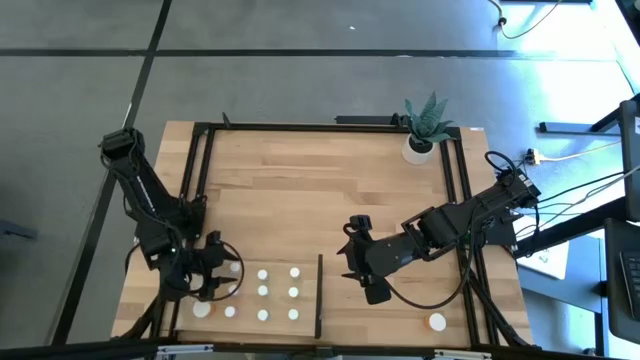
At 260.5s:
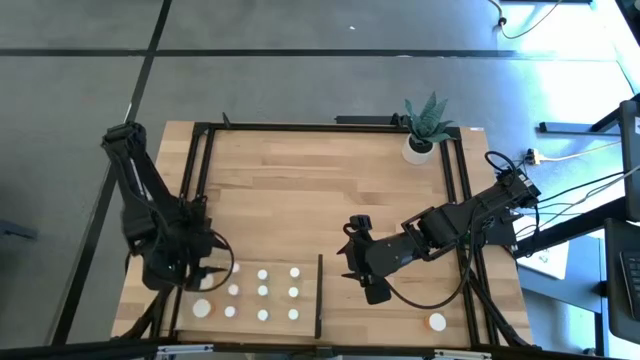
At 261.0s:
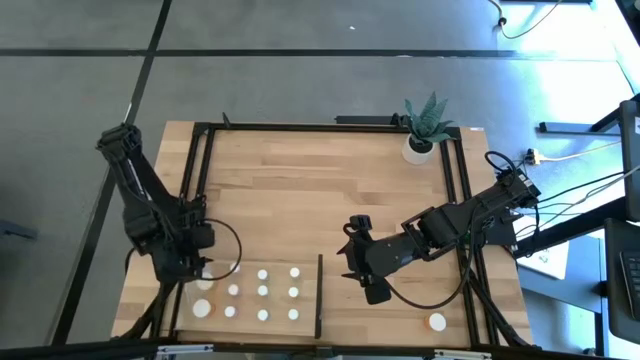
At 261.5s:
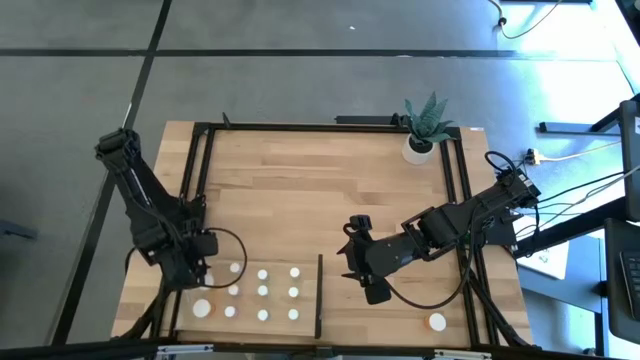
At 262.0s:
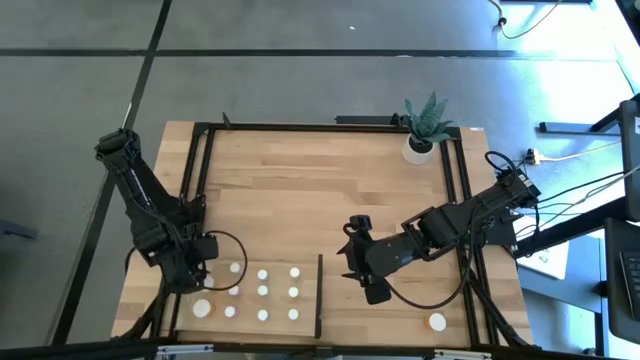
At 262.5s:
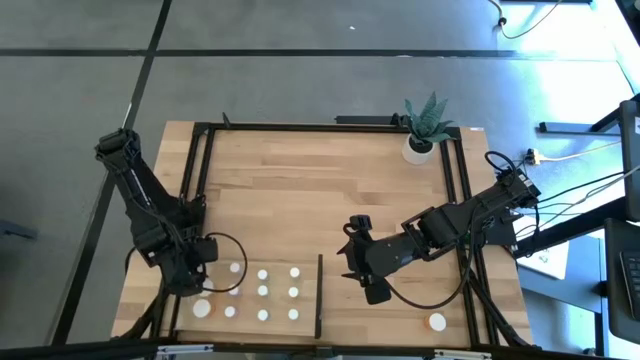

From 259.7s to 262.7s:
Task: Pick and place medicine bottles onto shelf by color
Adjust the orange pill bottle on the shelf

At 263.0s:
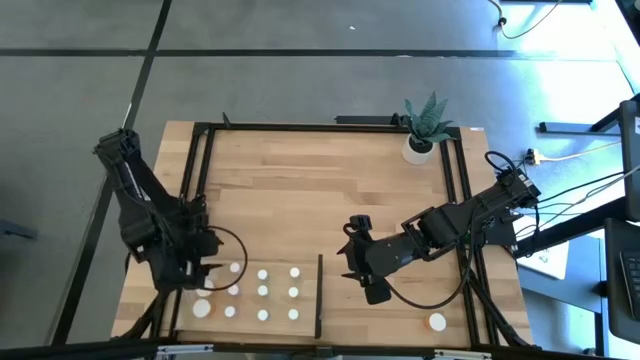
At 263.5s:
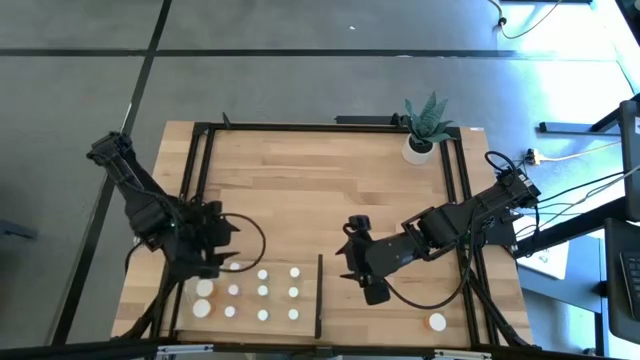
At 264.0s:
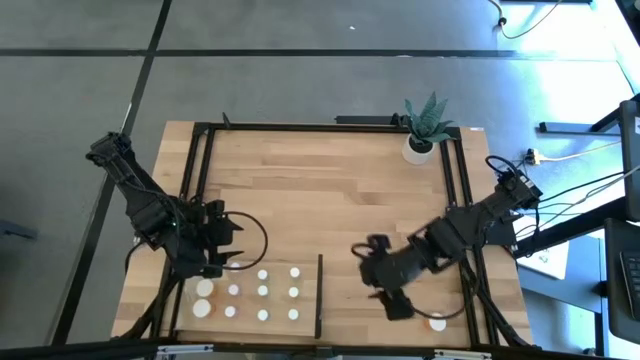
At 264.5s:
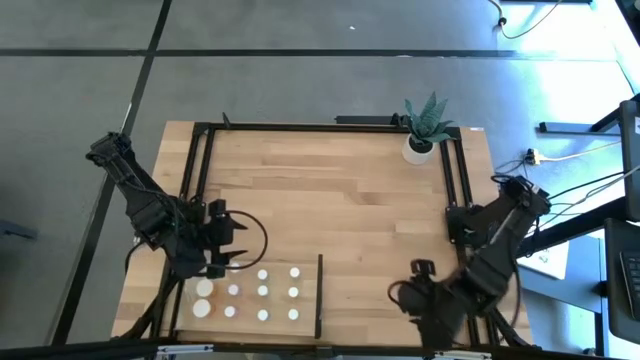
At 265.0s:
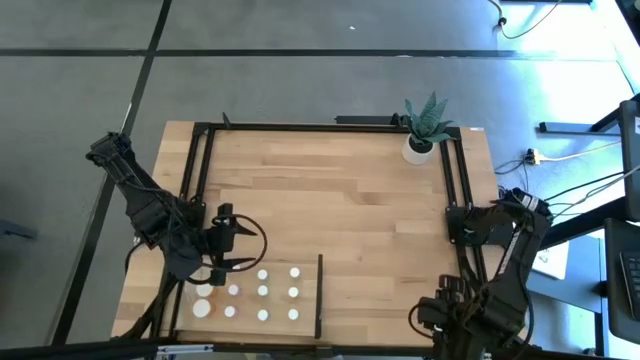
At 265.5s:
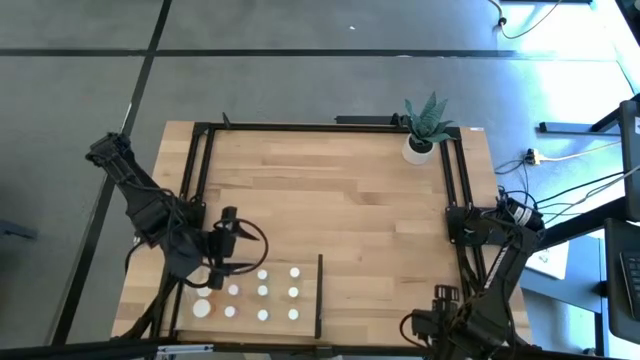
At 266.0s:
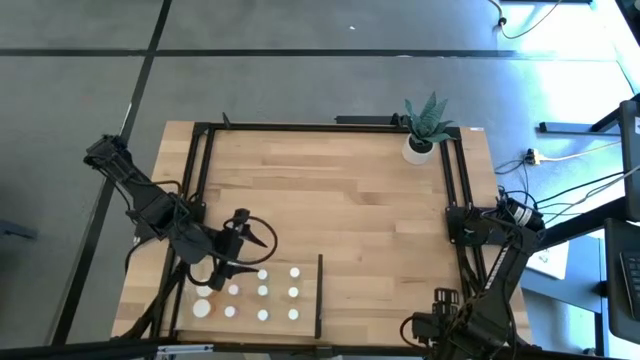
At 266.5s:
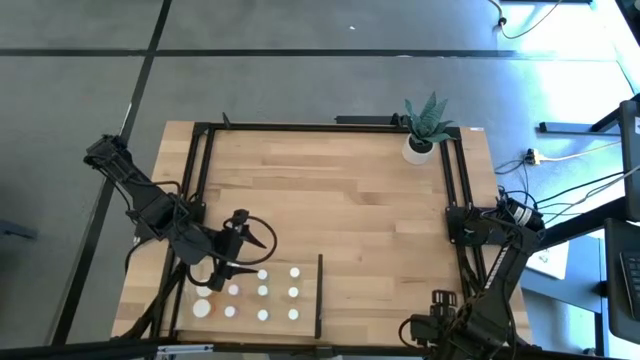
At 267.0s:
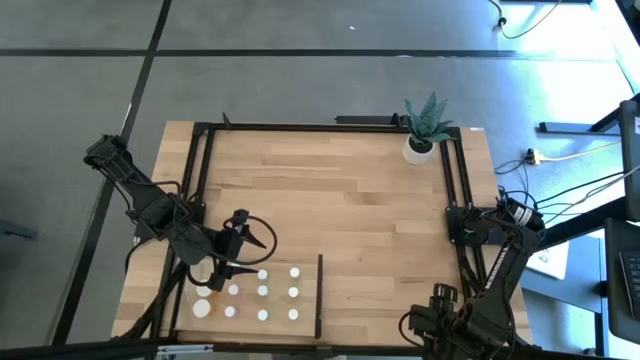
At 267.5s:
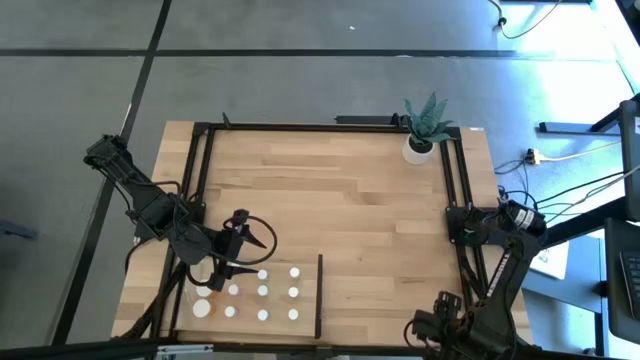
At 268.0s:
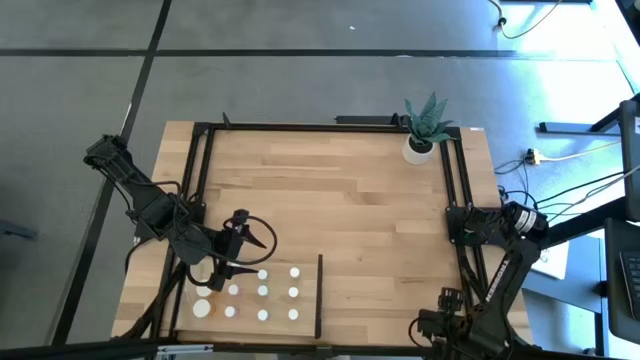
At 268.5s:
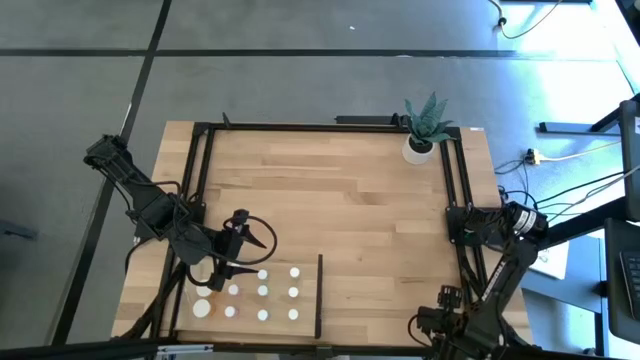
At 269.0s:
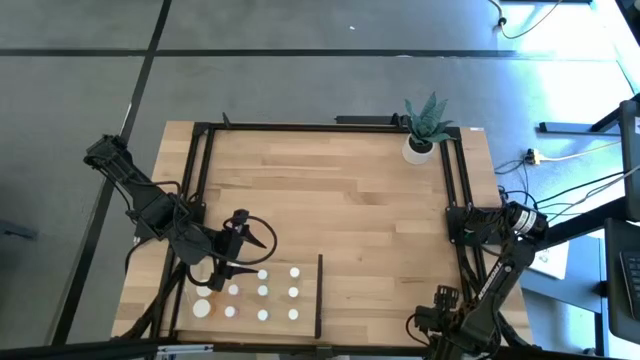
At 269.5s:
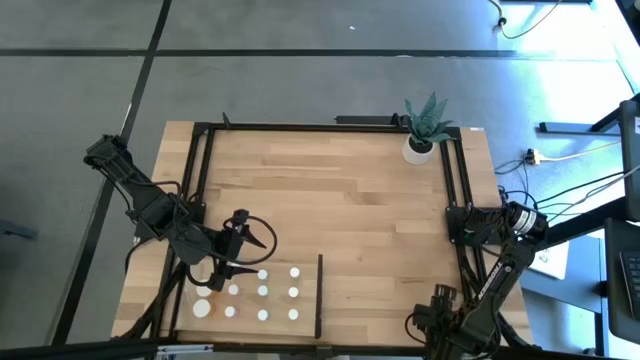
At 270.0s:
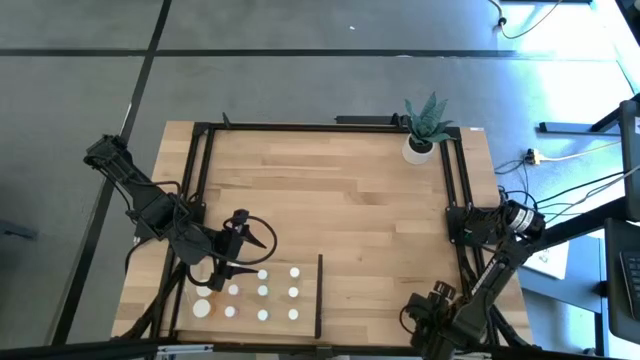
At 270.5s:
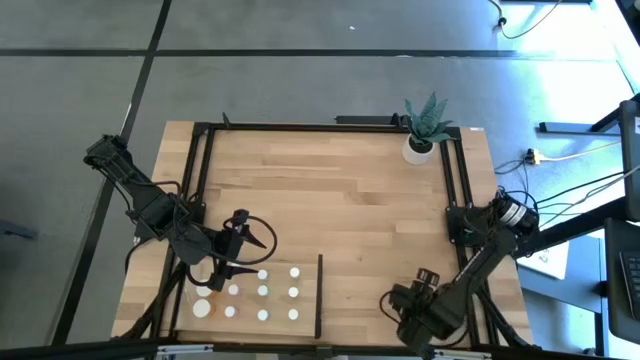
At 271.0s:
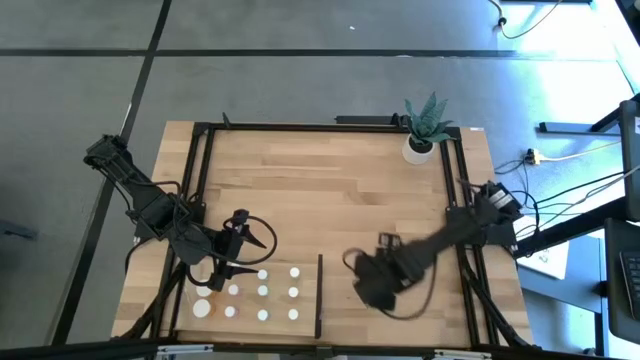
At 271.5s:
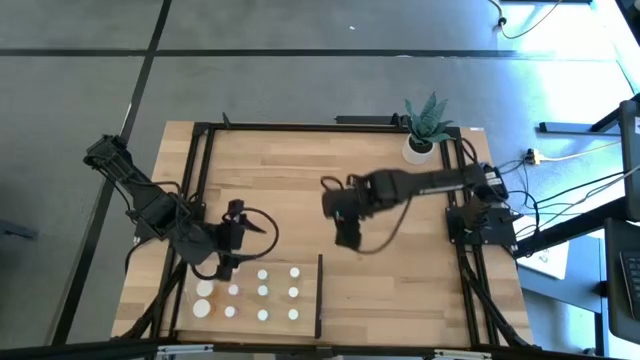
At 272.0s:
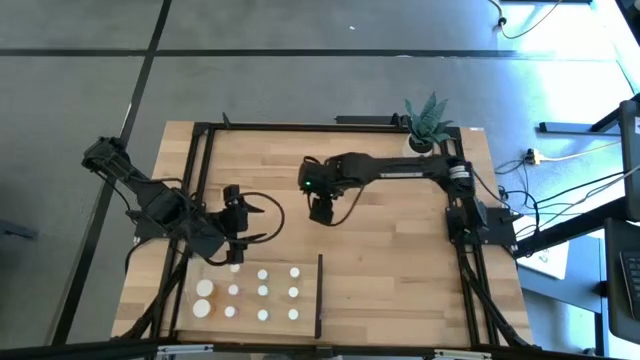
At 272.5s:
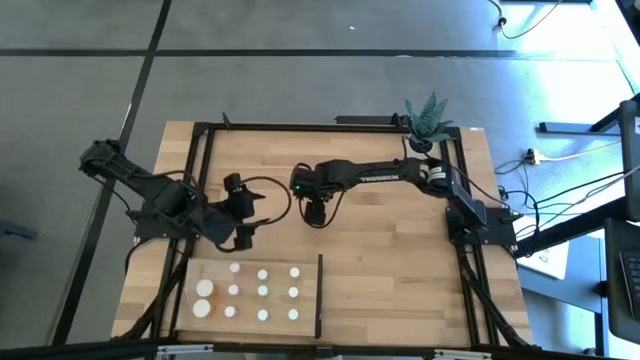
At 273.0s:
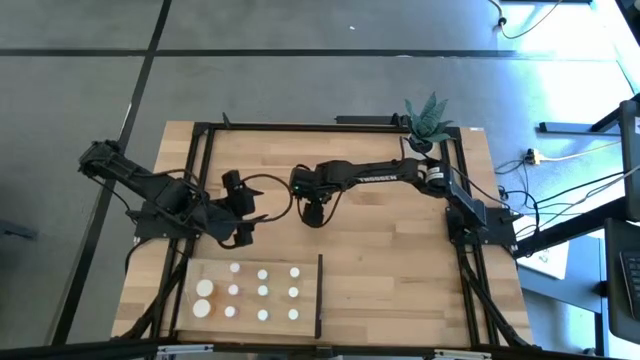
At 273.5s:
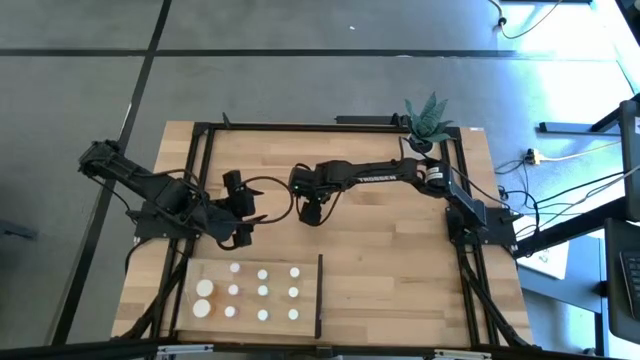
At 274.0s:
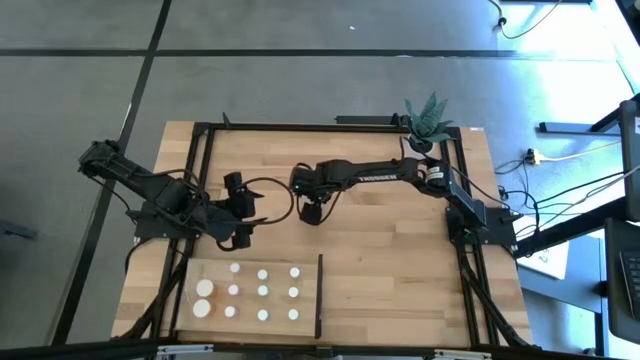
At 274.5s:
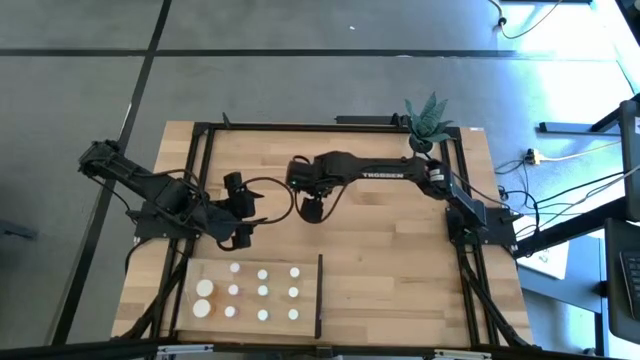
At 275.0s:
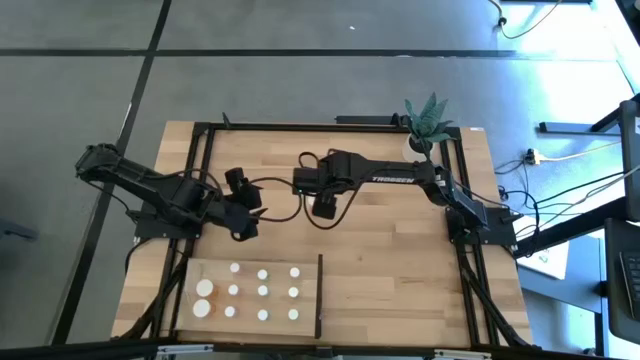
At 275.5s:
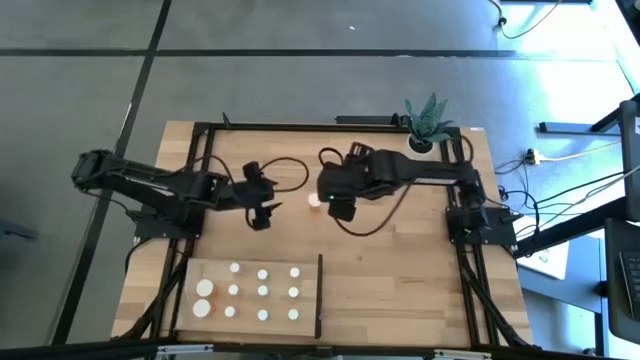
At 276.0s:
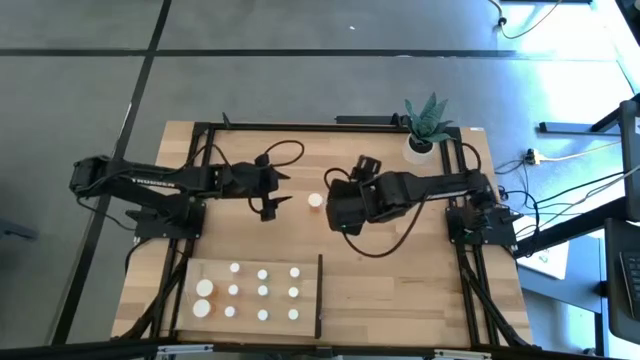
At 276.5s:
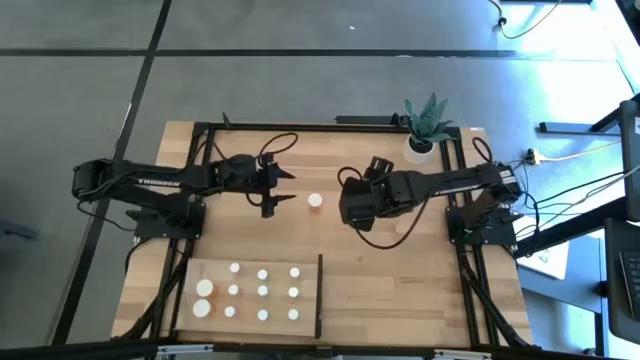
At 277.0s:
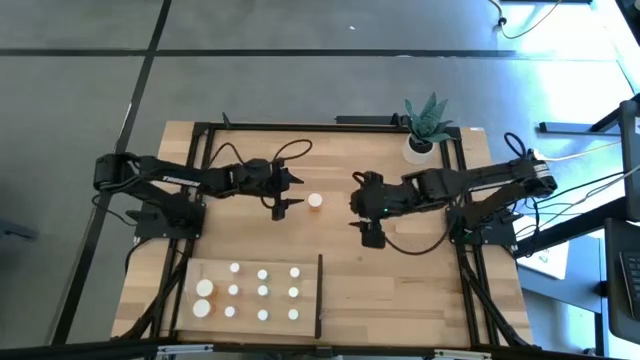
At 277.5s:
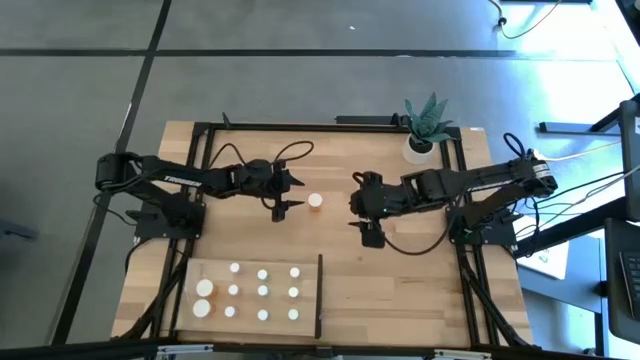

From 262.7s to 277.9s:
Put the orange pill bottle on the shelf aligned with the other orange pill bottle

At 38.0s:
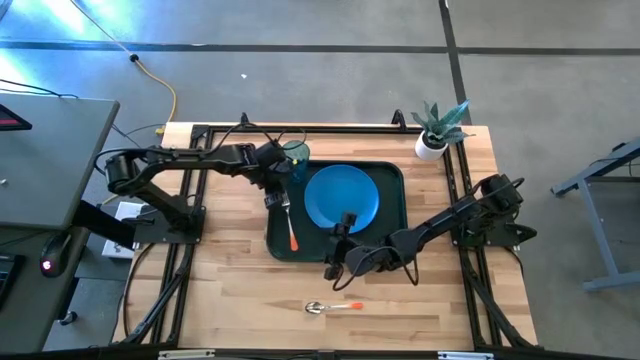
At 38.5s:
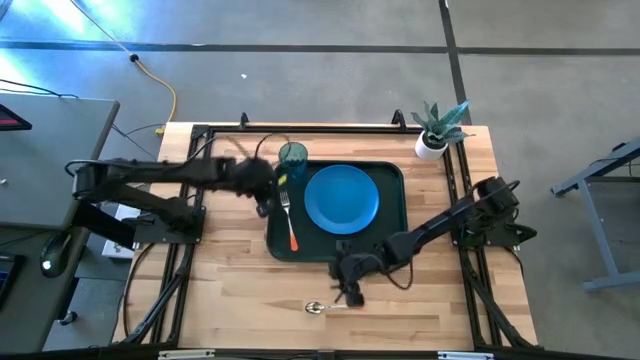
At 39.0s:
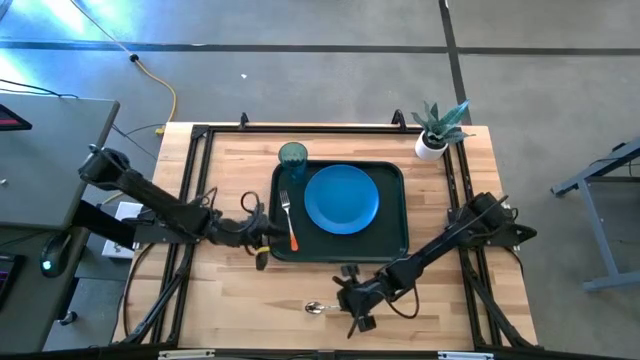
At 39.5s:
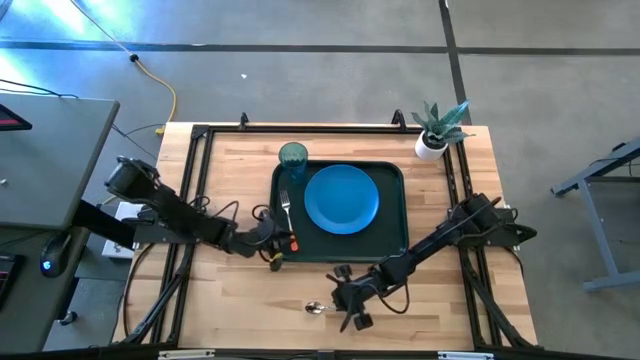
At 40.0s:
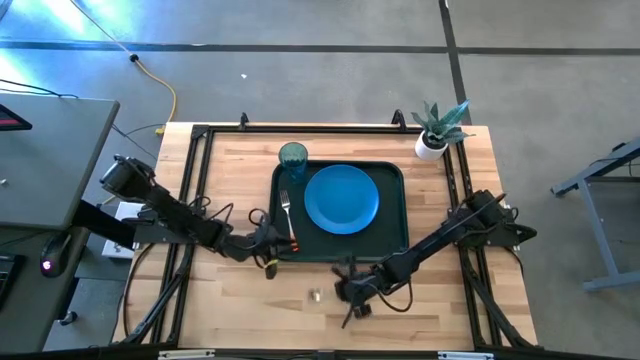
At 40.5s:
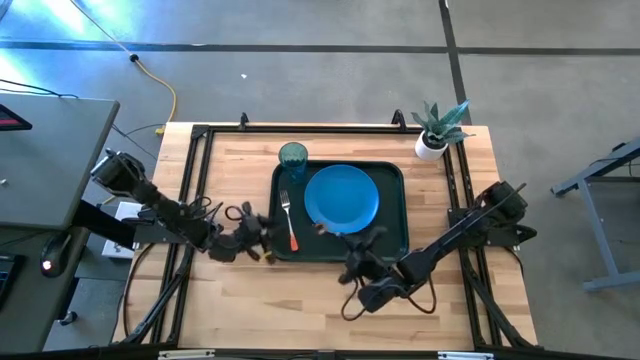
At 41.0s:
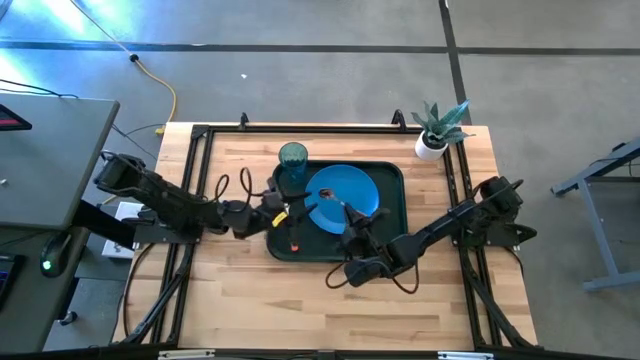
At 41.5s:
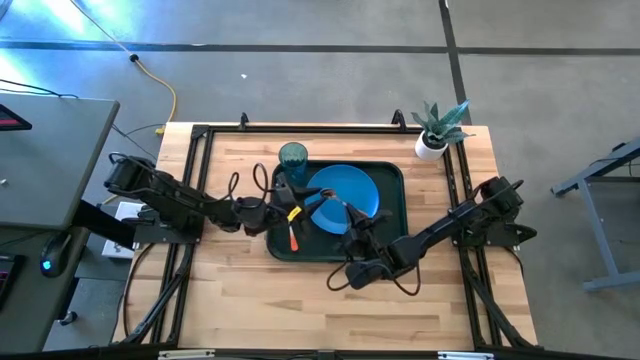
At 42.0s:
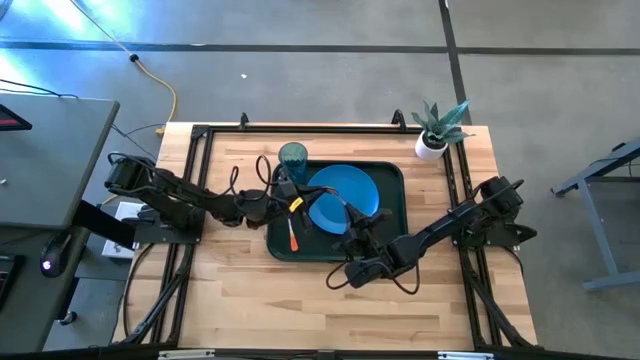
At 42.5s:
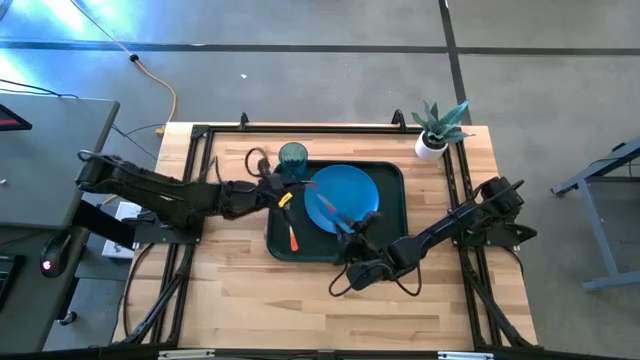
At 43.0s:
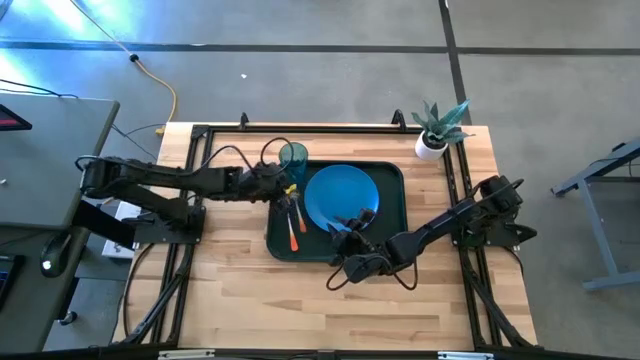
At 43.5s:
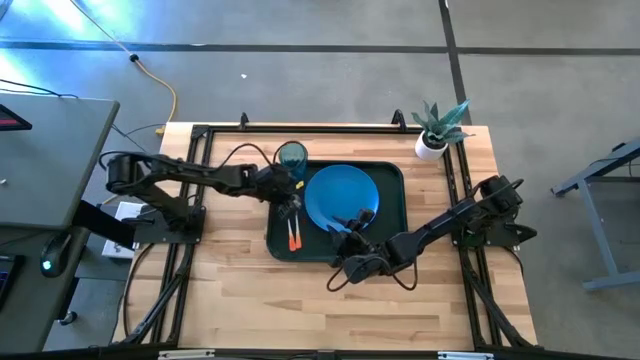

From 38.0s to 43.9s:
Task: Pick and place plate/cup/fork/spoon on tray
Put the orange spoon on the dark green tray to the left of the blue plate
